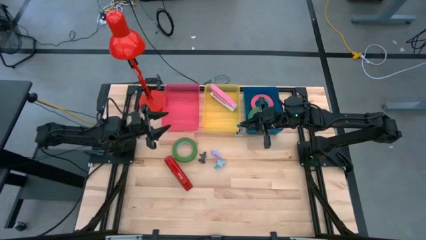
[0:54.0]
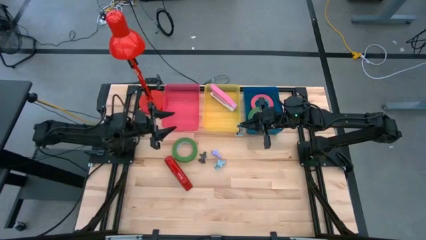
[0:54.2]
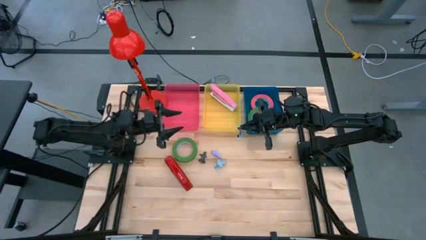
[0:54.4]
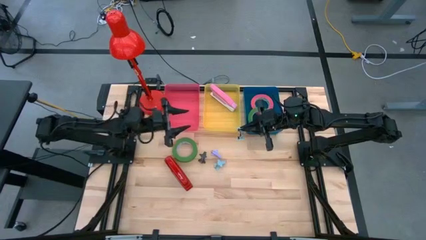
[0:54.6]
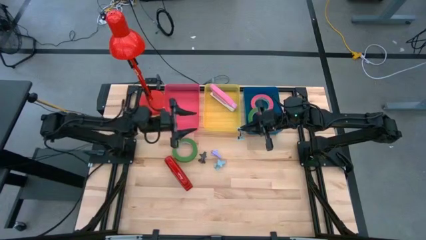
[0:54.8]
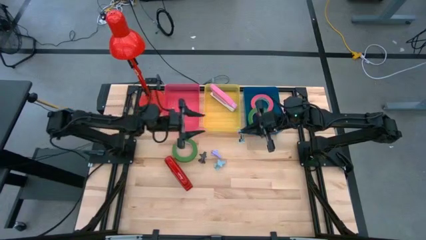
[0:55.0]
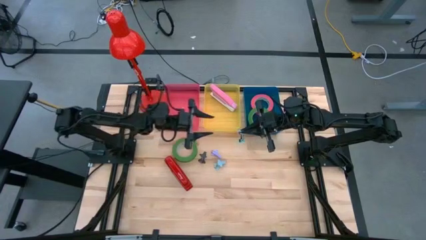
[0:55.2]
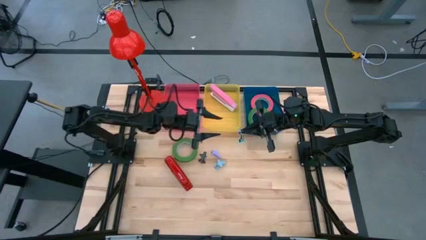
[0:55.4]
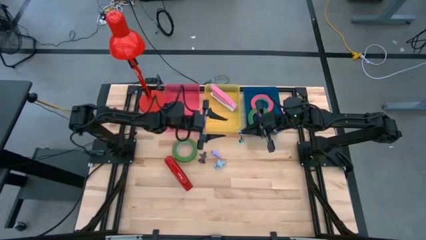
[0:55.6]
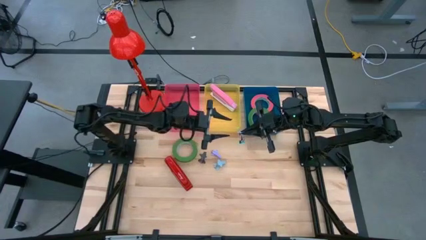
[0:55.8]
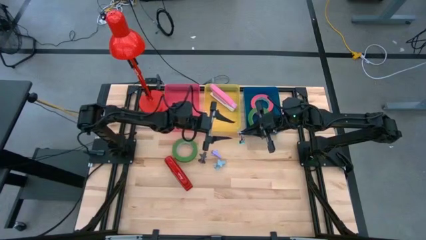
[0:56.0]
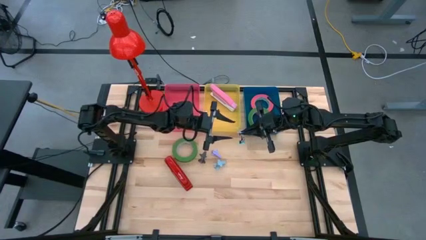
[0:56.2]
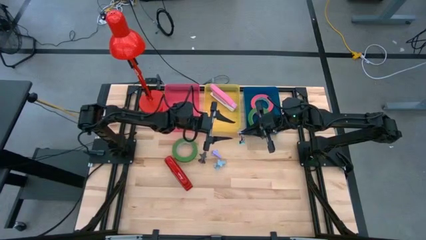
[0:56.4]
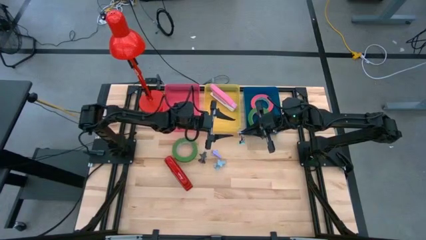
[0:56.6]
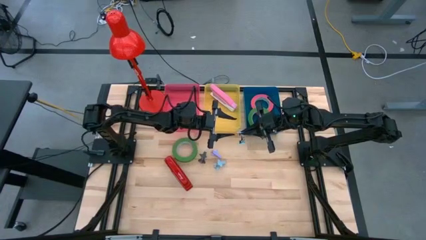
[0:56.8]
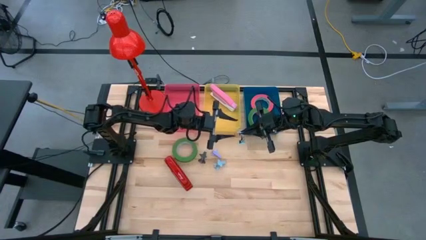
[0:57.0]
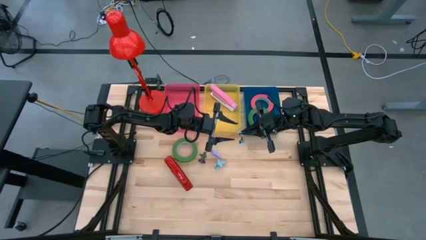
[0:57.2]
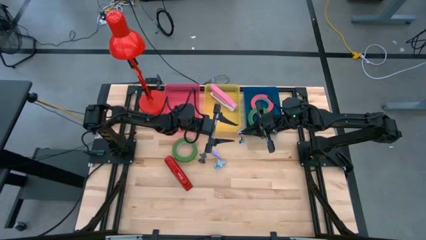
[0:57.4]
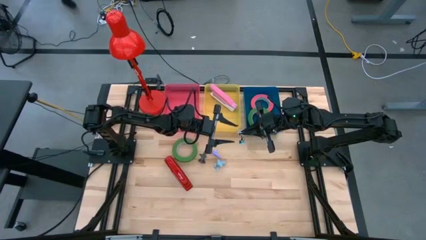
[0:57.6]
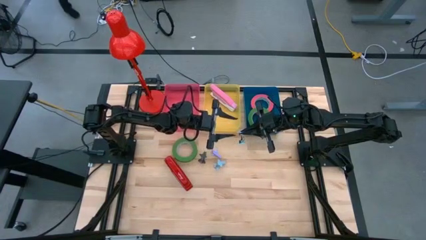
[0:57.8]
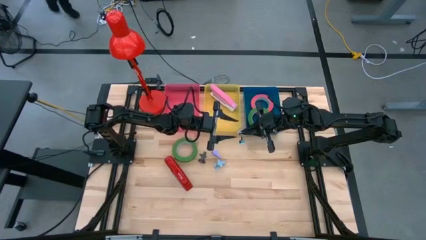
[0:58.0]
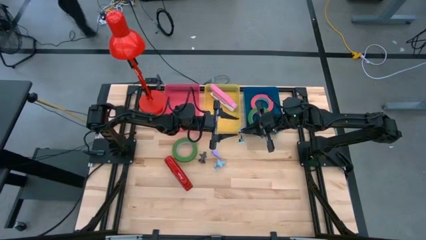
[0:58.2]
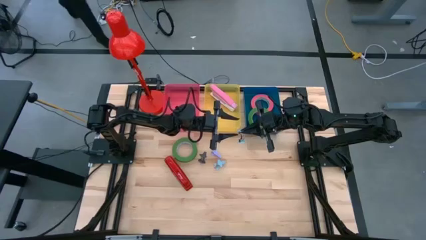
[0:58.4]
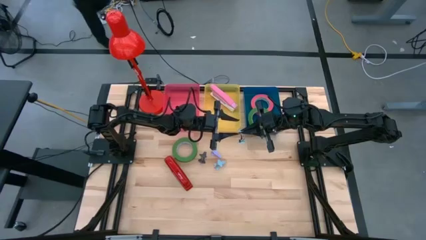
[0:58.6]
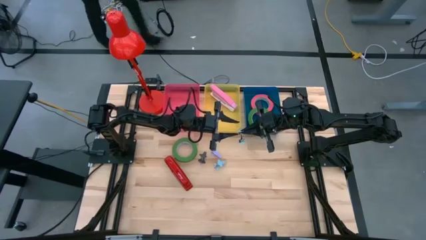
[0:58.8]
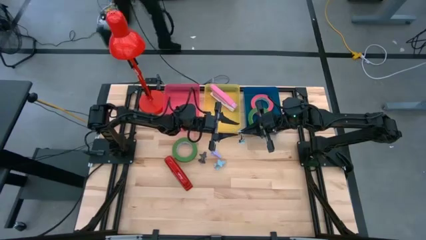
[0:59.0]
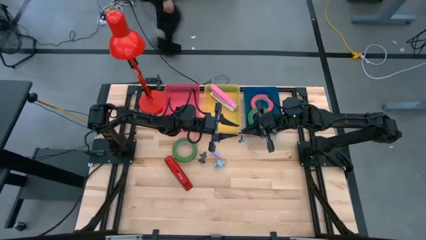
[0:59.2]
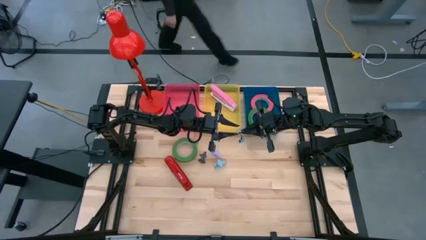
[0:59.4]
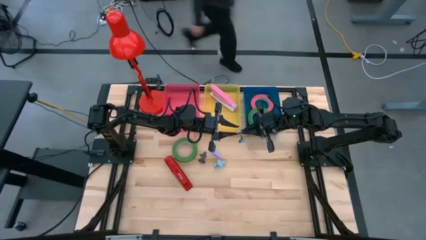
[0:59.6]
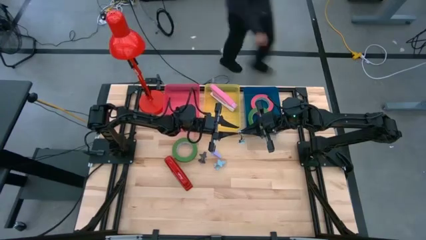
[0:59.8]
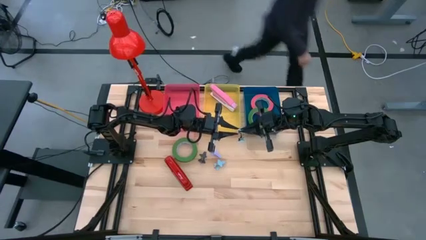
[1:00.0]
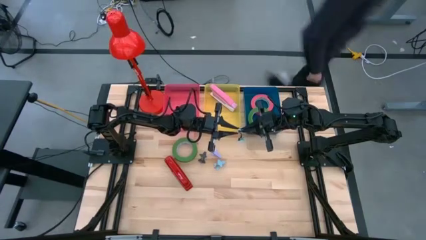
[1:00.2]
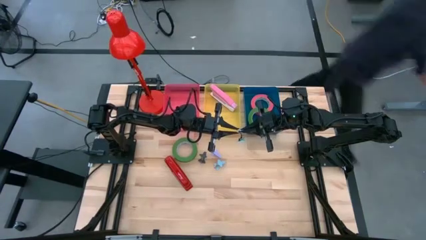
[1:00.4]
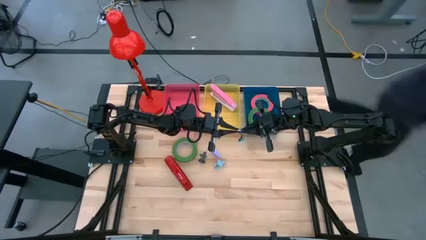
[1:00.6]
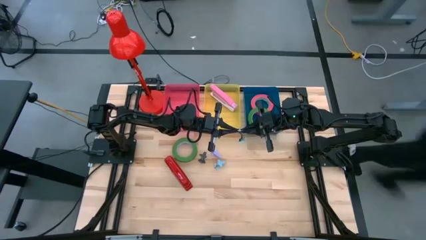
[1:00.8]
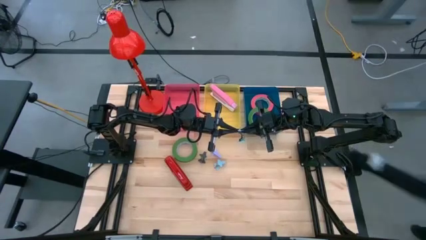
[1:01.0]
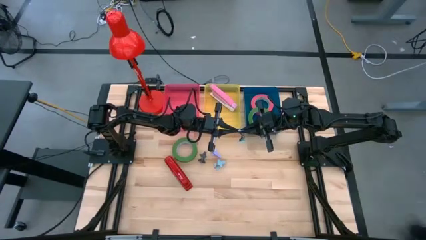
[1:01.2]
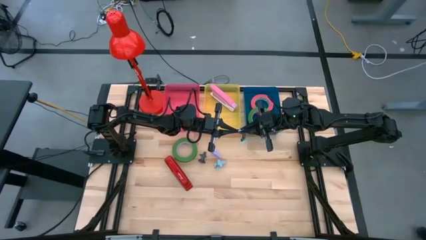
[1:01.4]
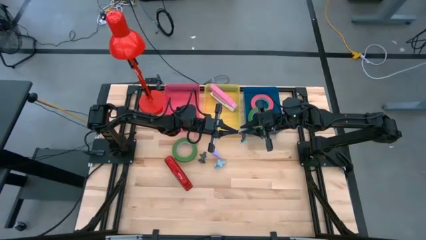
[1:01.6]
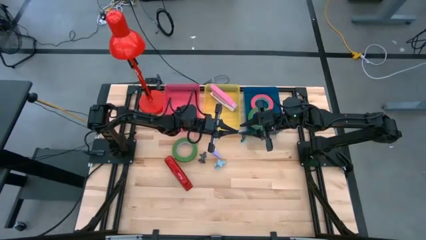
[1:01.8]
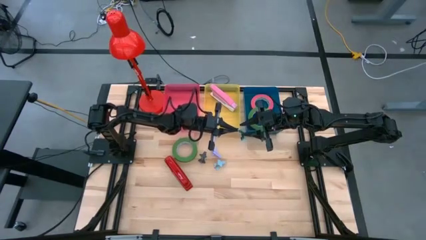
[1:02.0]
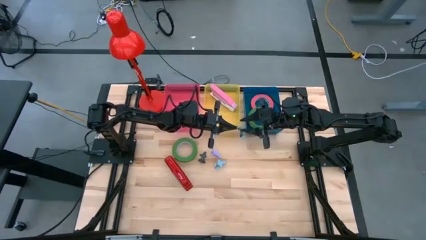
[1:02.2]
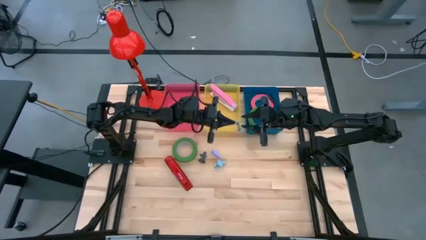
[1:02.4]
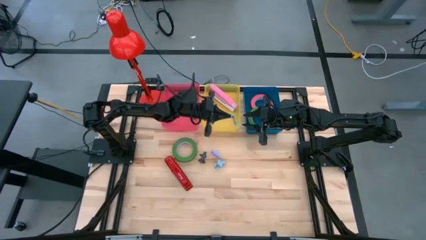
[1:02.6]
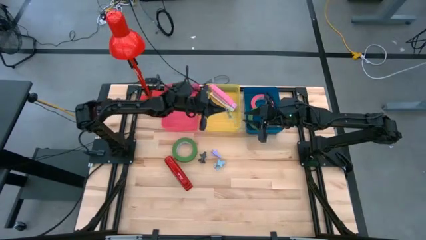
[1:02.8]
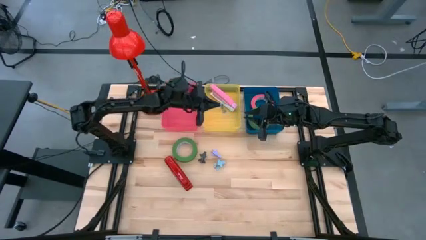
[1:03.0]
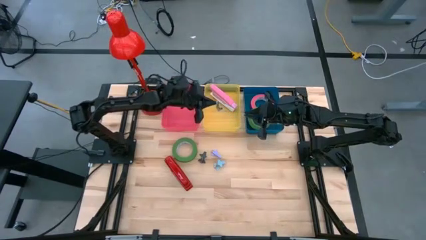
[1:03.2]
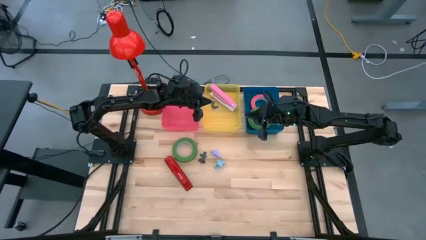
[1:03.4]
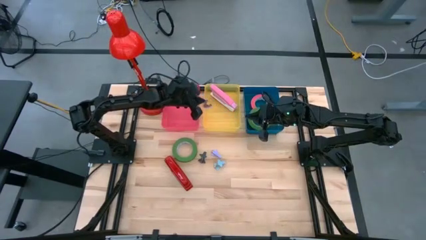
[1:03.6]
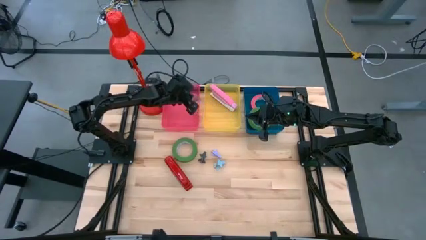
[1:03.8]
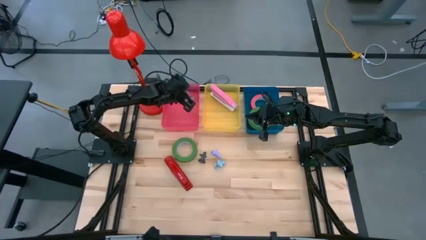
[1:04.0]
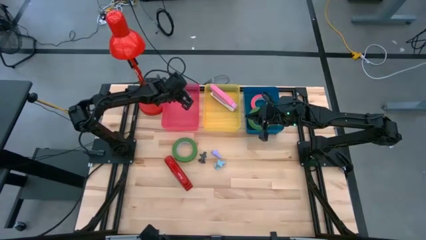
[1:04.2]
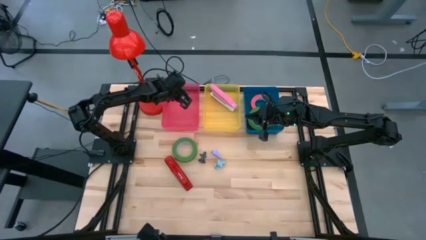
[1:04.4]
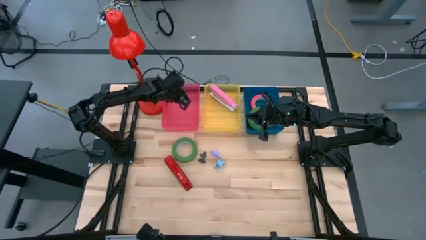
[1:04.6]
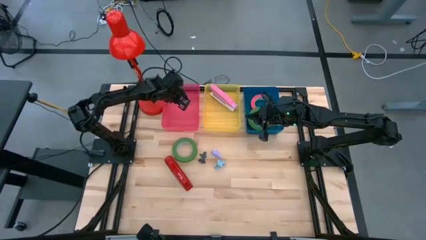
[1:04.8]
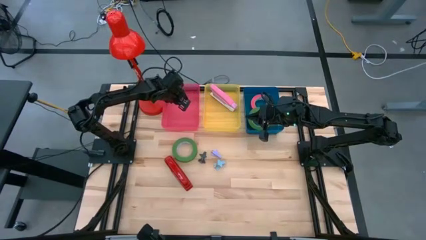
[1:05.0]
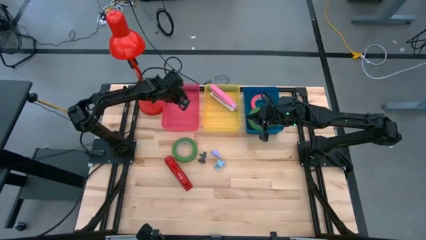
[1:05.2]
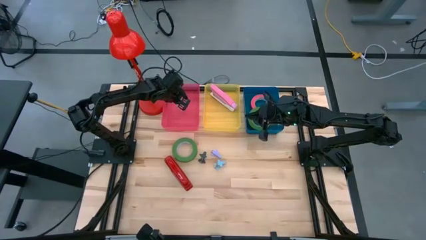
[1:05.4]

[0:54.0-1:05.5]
Task: Pick and place Stapler, Stapler remover, tape
Put the right blue staple remover into the pink bin
